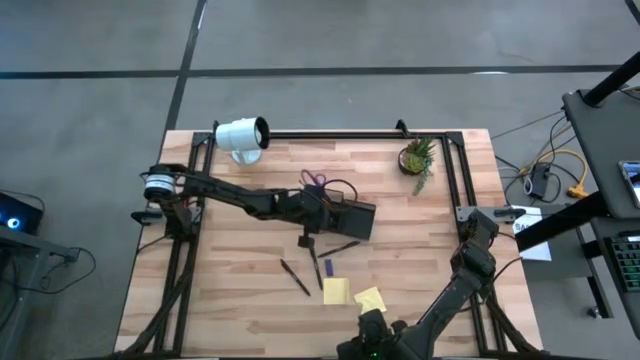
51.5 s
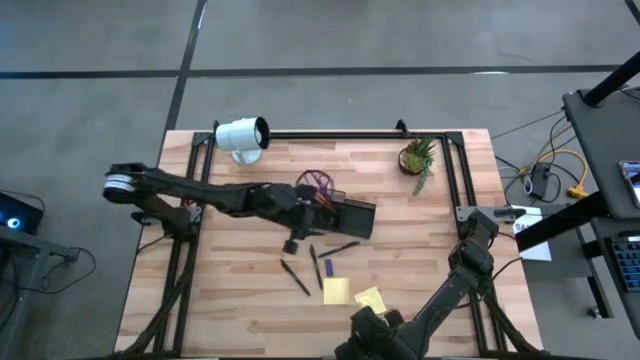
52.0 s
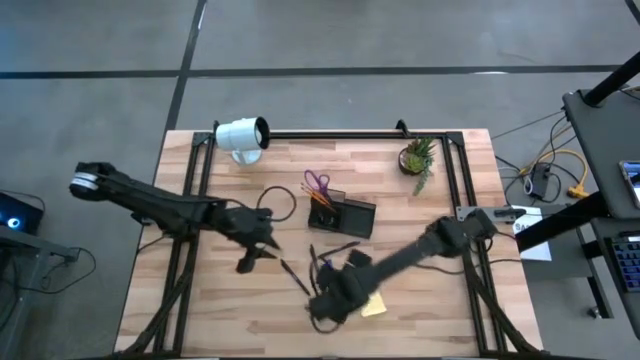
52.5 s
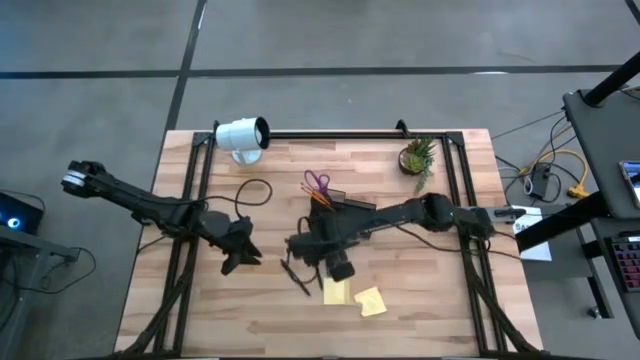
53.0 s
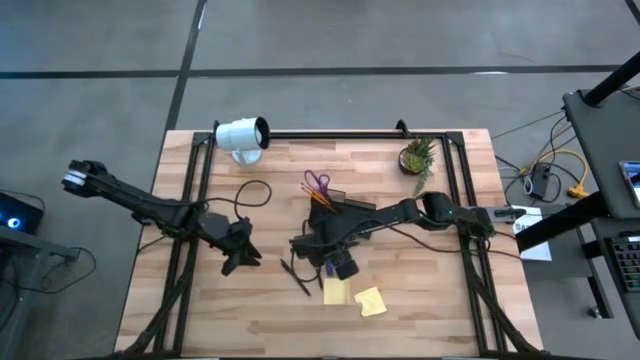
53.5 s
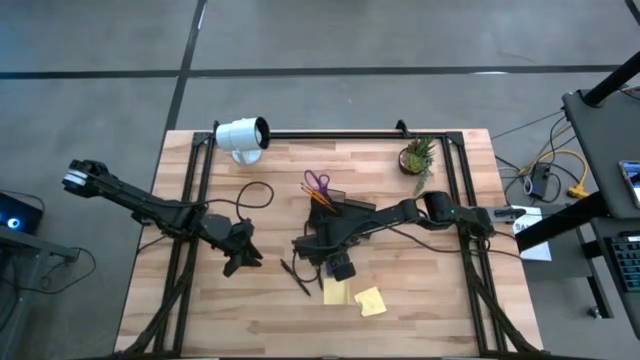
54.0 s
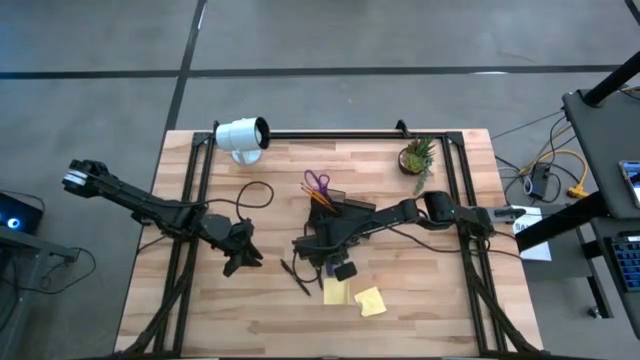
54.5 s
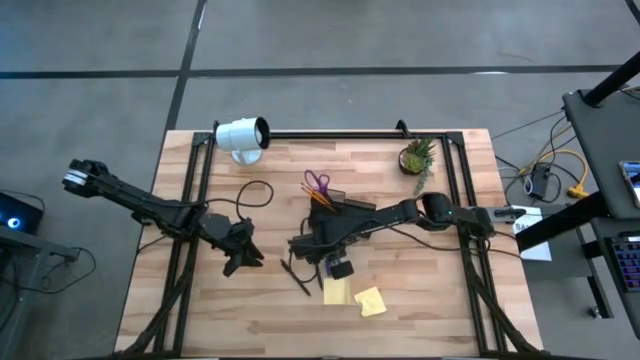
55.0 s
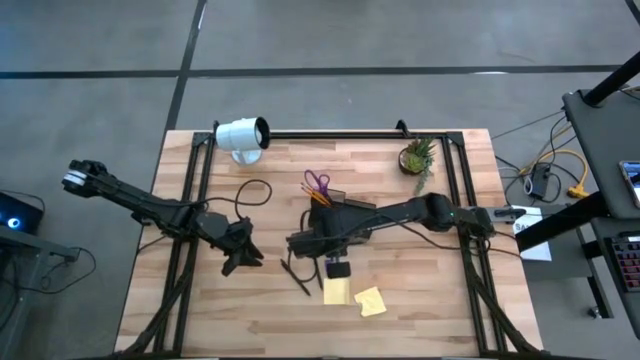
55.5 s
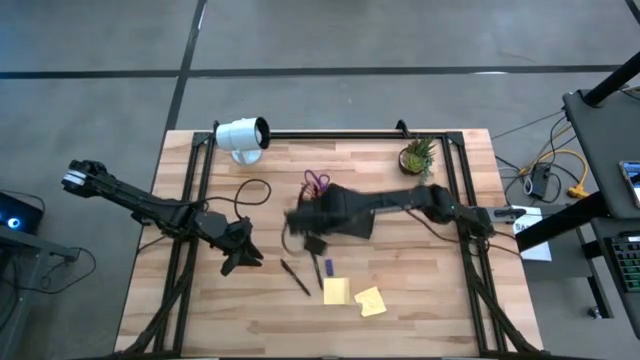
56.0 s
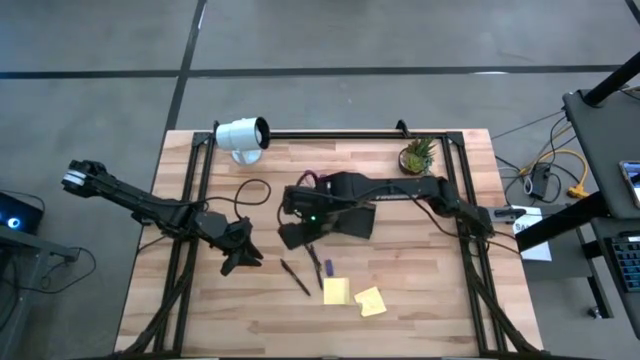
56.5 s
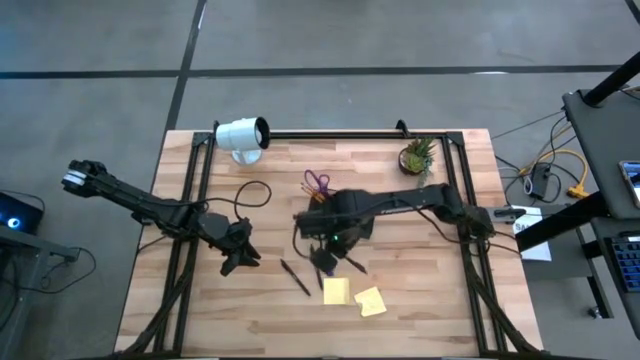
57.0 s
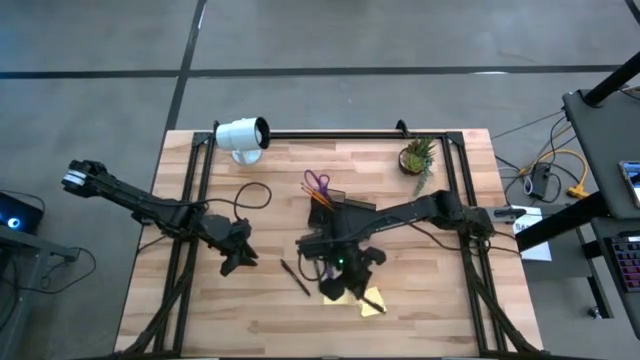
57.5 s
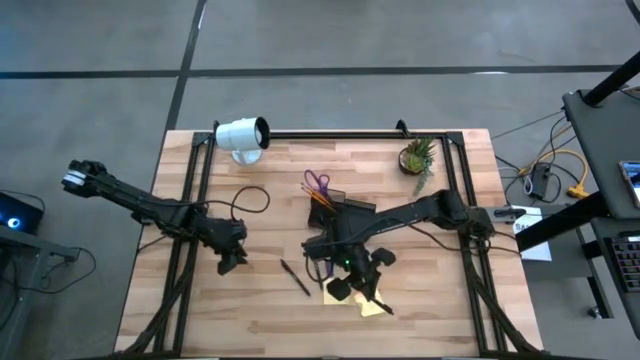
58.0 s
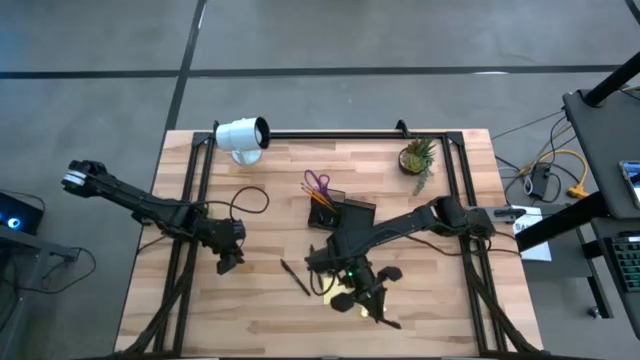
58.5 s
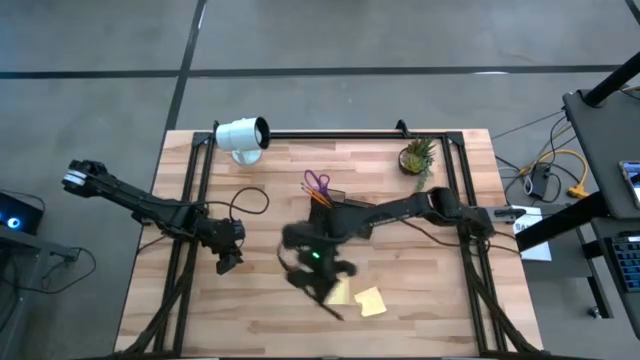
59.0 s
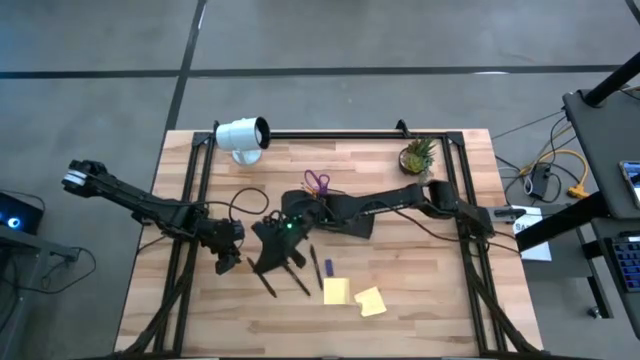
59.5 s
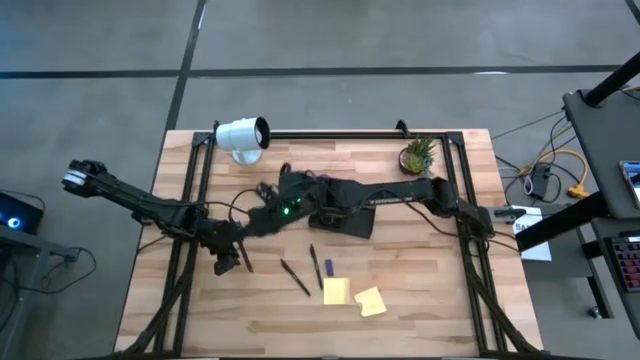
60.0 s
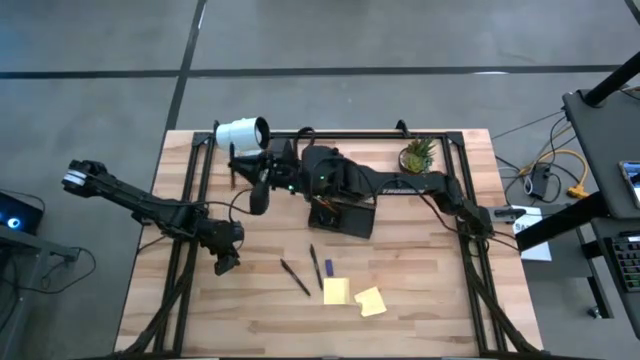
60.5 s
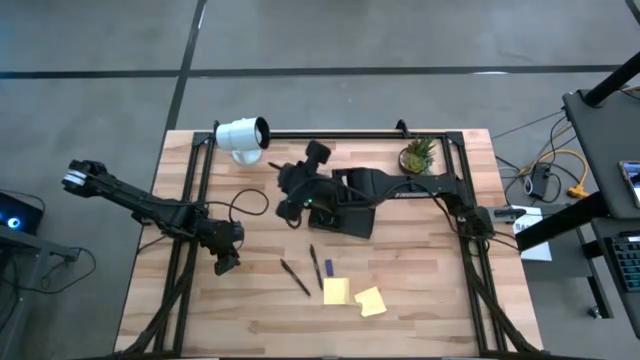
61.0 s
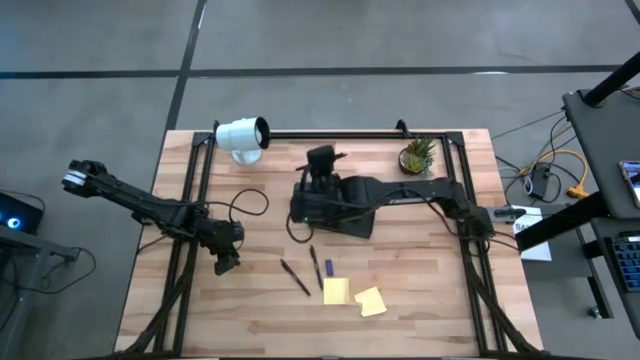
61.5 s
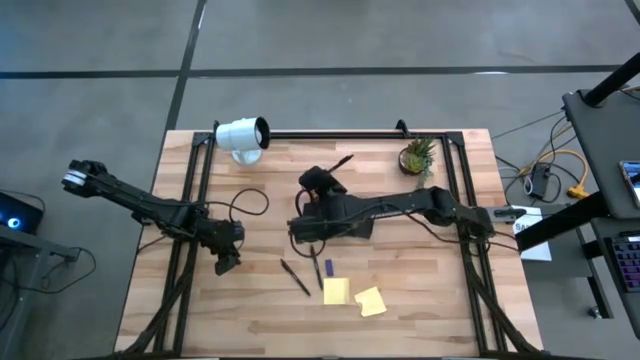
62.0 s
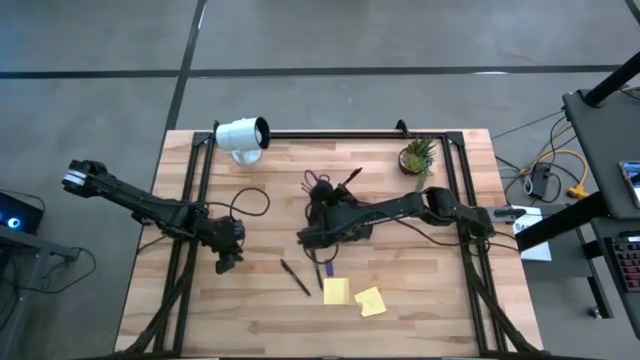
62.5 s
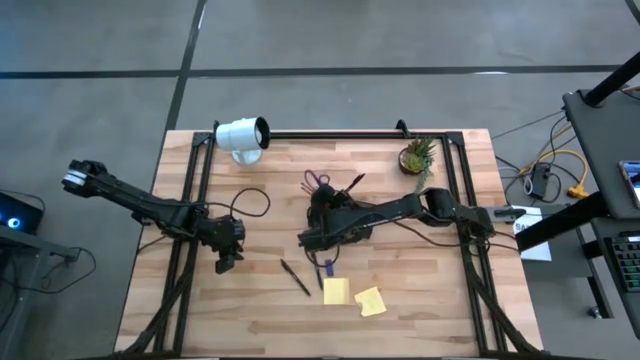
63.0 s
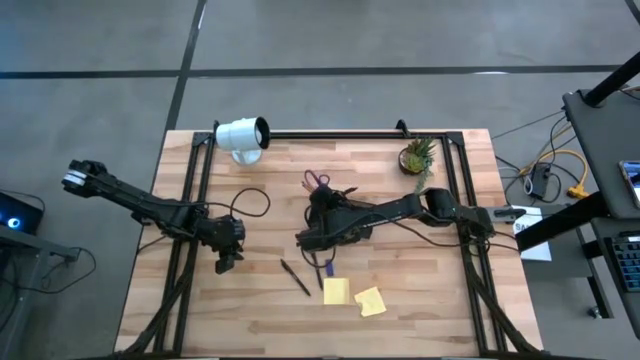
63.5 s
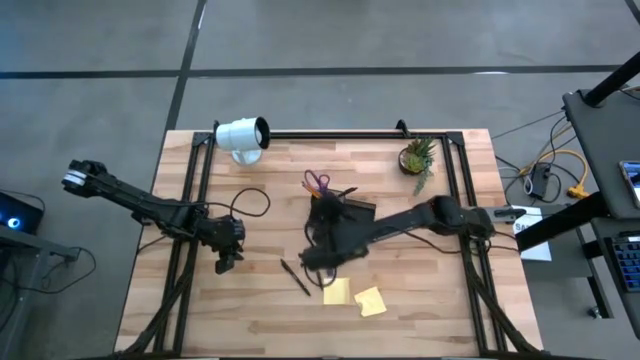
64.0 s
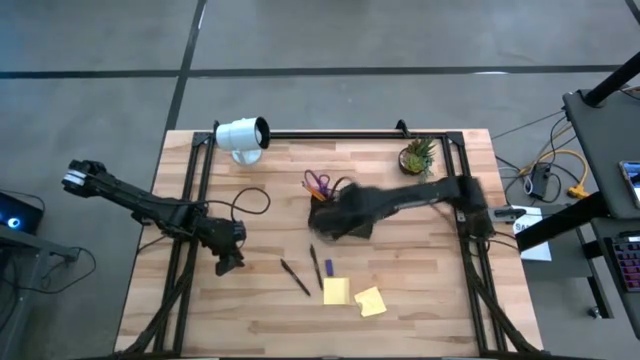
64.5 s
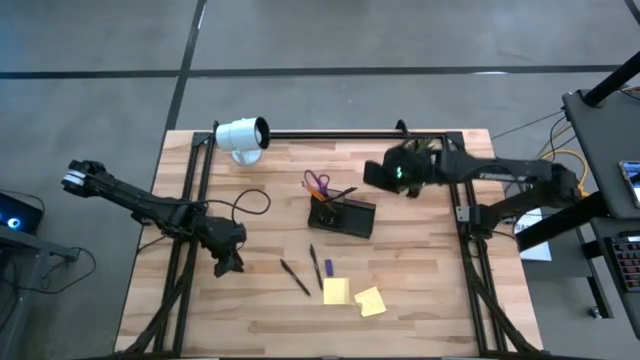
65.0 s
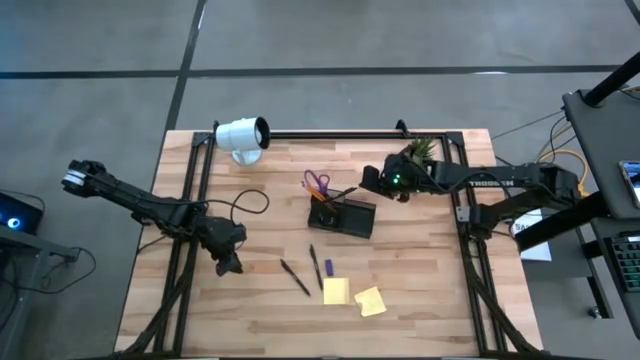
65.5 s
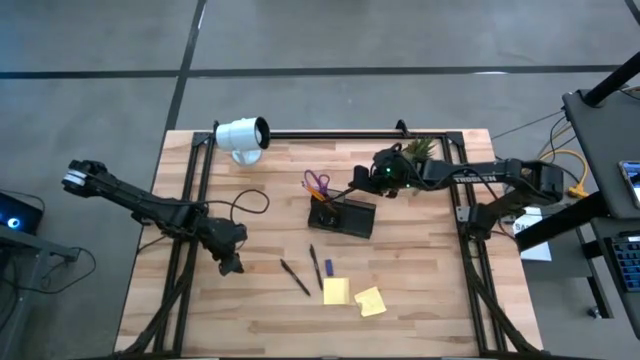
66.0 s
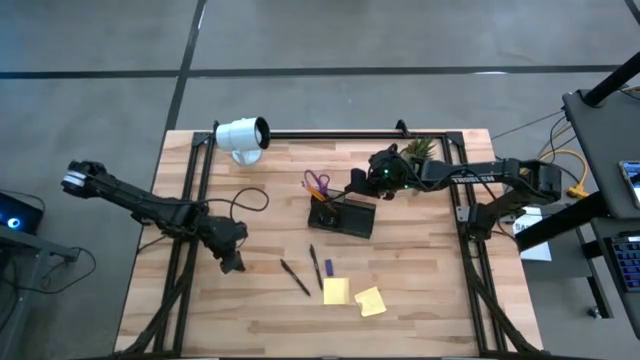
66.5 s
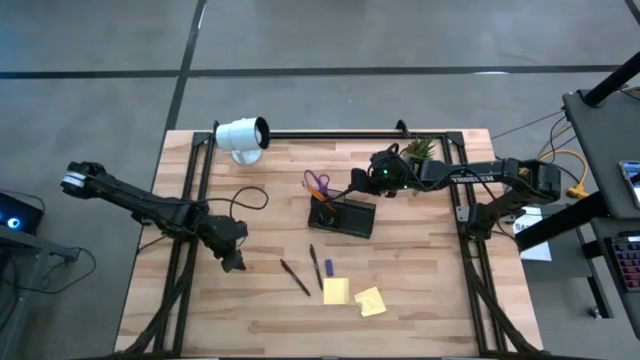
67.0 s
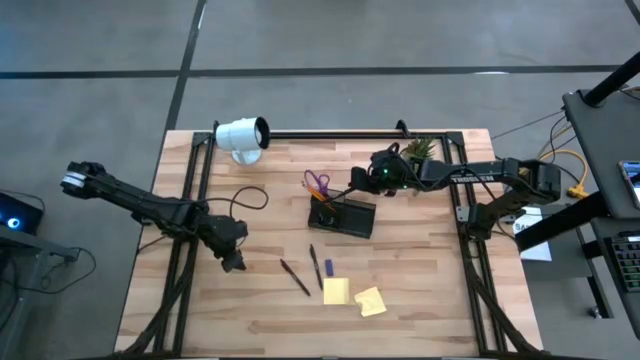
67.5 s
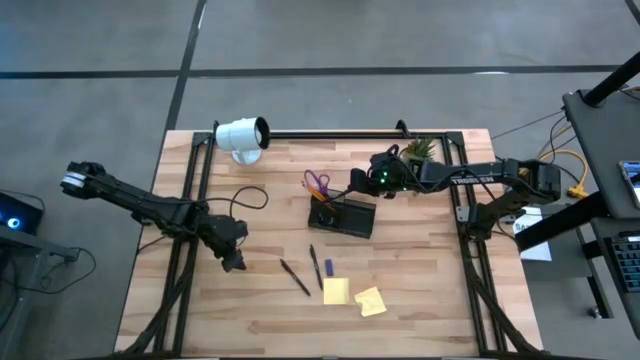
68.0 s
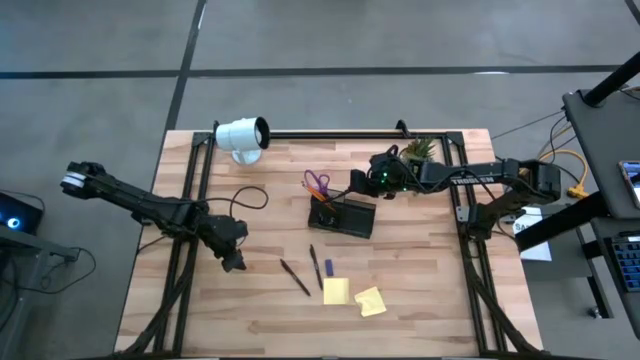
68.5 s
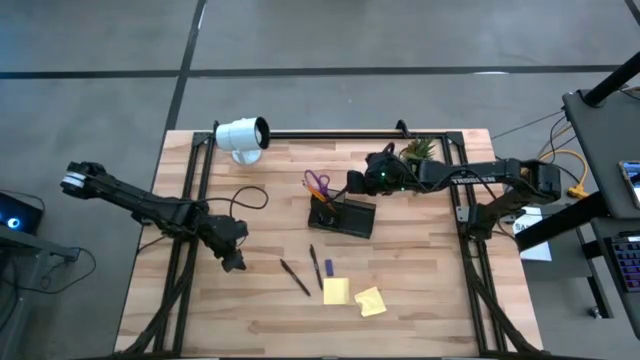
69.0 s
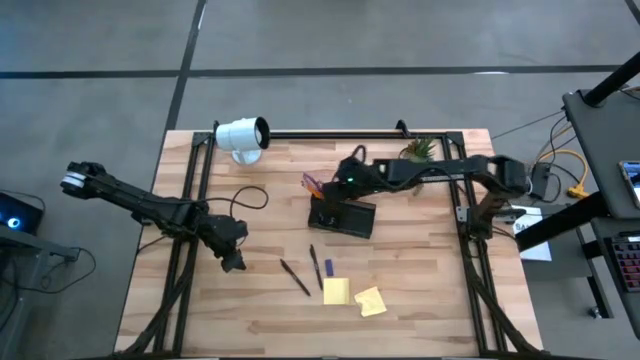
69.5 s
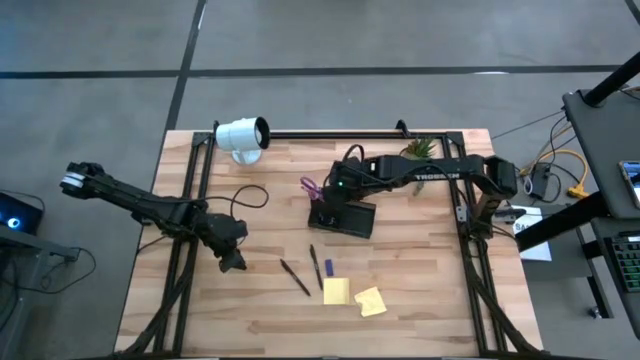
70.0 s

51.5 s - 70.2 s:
Task: Pick and place office supplies into organizer
Put the right black pen into the black desk organizer
